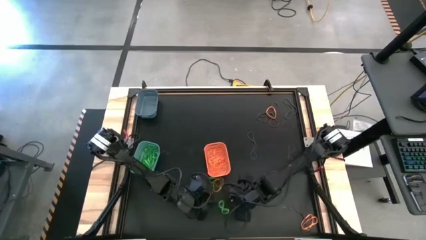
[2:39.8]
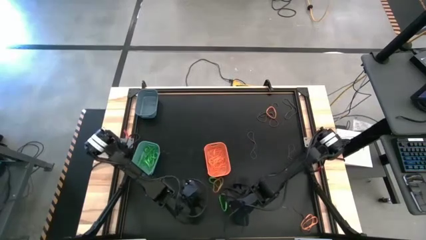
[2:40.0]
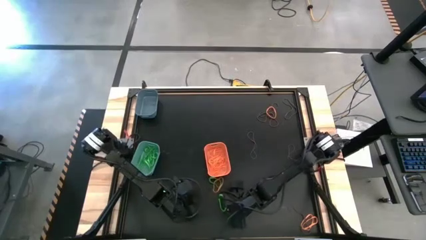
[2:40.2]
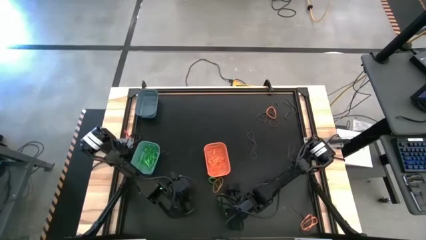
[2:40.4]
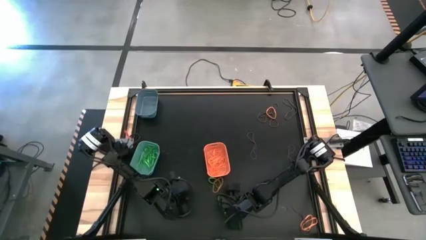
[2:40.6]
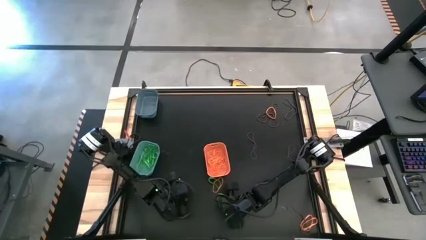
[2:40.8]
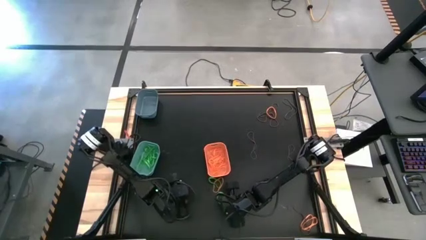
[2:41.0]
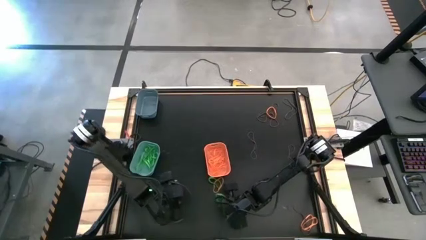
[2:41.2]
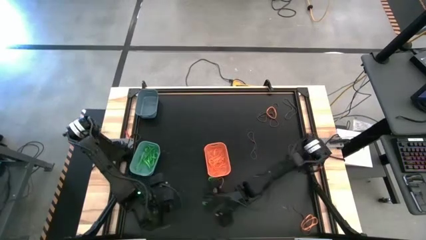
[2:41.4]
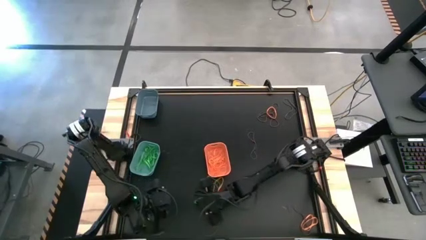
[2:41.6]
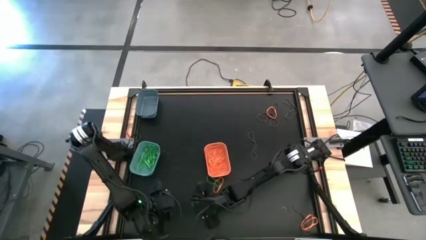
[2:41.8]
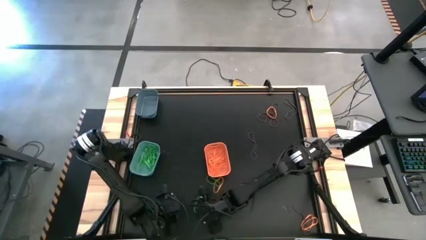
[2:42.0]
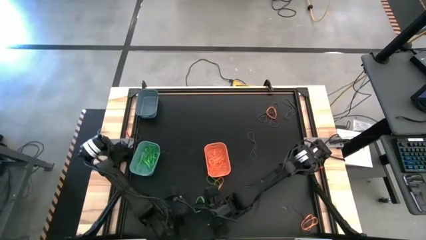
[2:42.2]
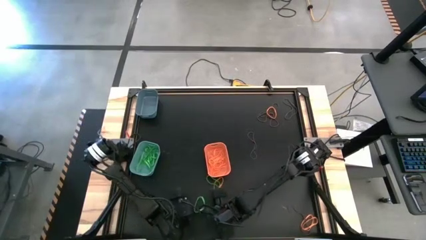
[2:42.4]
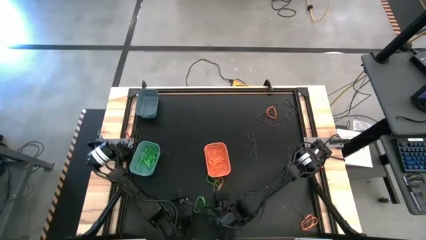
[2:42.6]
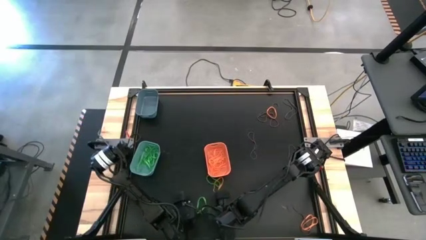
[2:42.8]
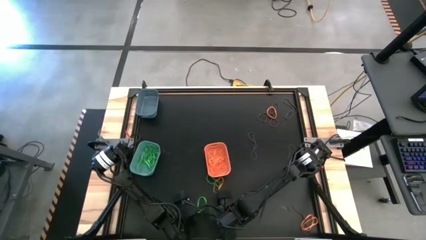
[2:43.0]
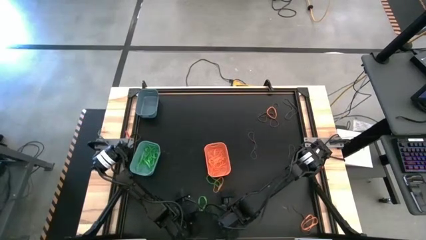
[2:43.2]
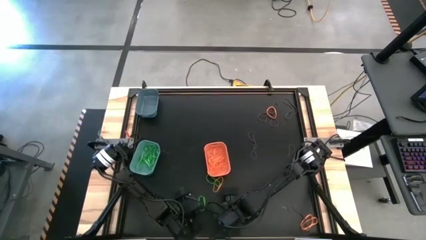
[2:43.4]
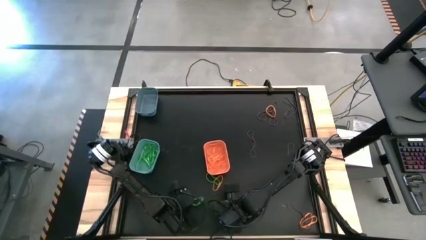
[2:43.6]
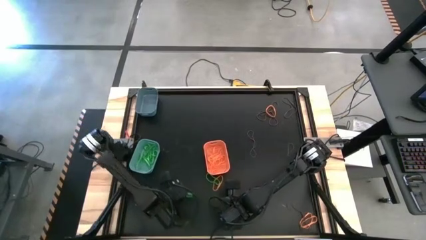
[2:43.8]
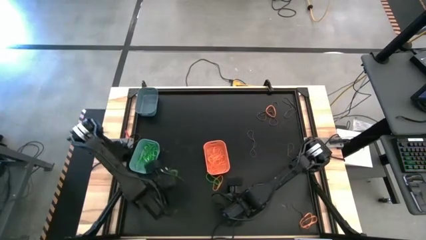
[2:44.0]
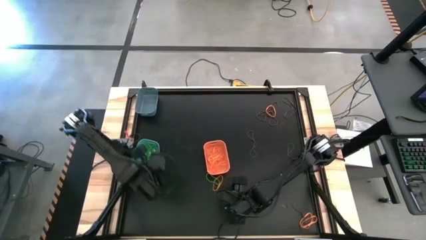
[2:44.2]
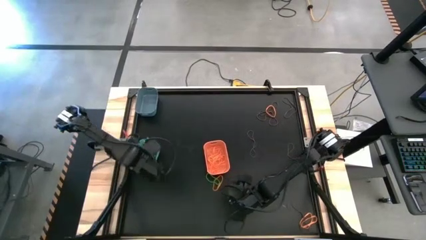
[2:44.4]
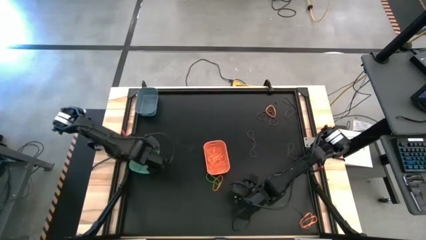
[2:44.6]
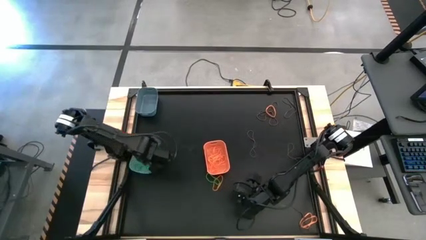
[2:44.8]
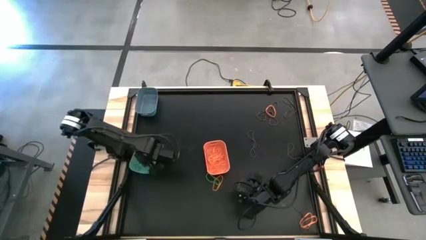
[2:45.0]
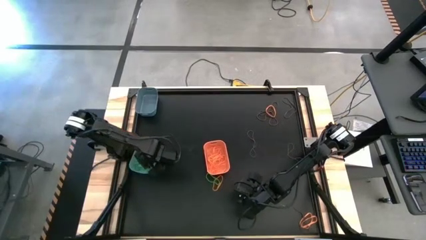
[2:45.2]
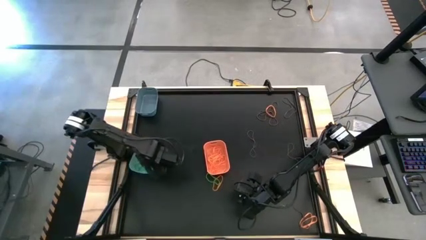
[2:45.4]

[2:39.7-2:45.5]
Task: Sort rubber bands into baskets
Put the green rubber band into the light sea green bin

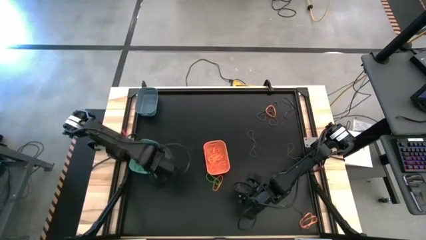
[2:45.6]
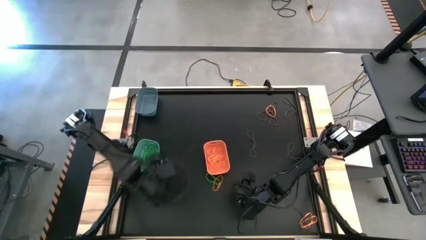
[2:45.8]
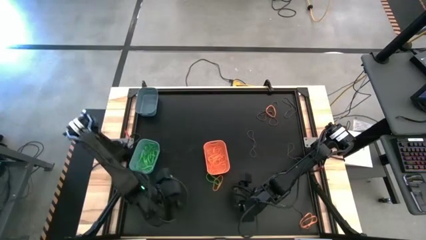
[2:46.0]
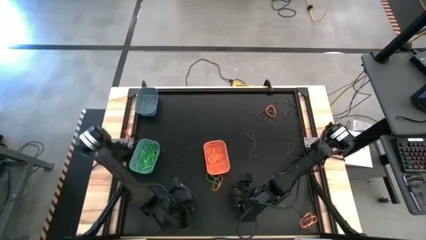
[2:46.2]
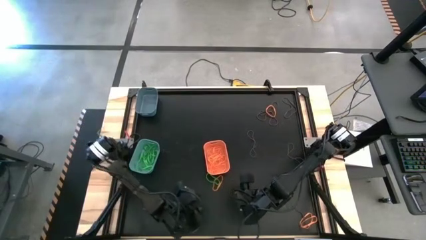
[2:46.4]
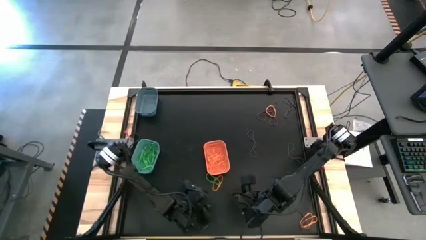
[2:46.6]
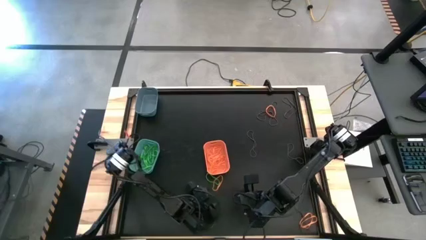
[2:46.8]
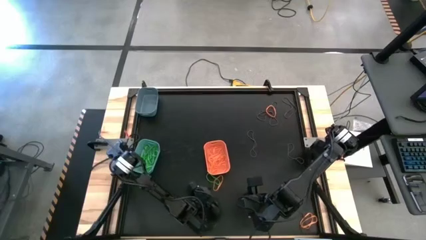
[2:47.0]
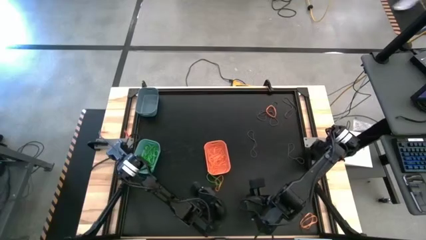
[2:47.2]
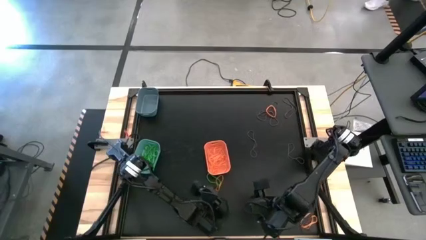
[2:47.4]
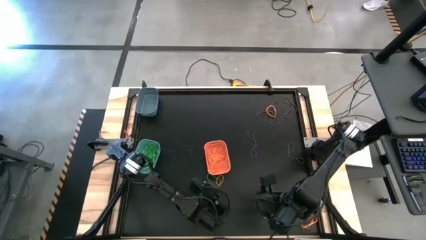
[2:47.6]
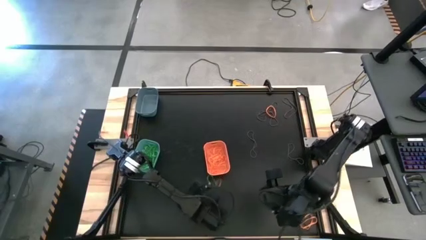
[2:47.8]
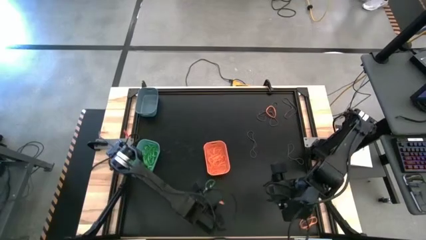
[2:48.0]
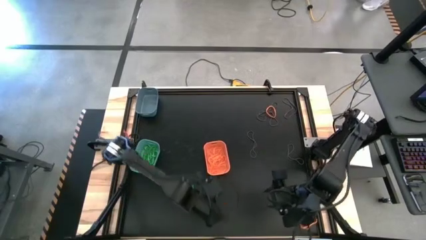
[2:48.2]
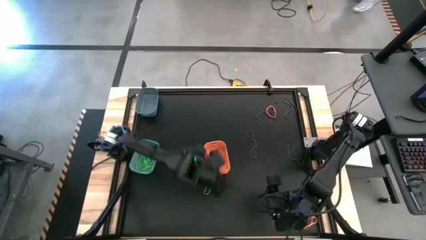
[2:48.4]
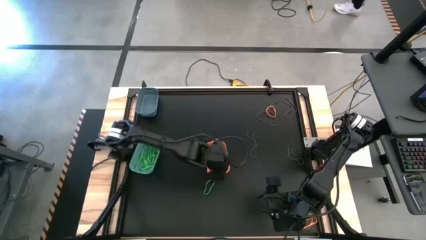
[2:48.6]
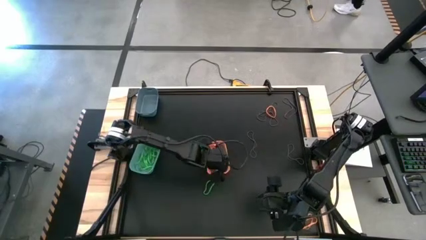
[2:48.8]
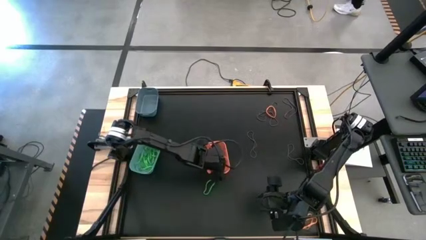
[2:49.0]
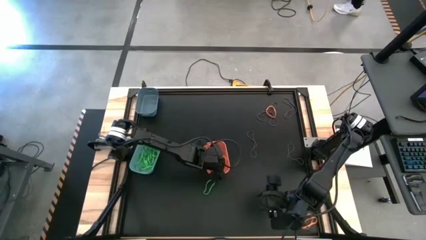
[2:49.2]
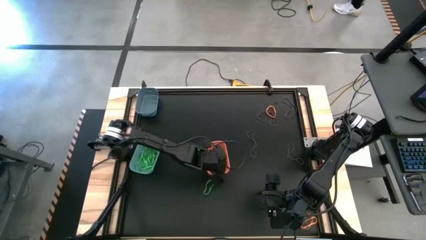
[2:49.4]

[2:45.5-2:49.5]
Put the orange rubber band into the orange bin

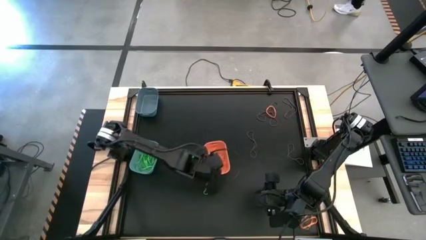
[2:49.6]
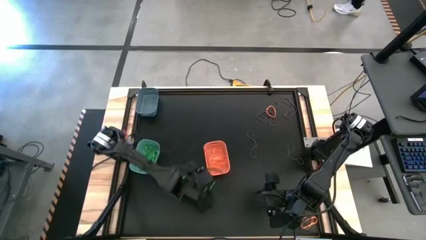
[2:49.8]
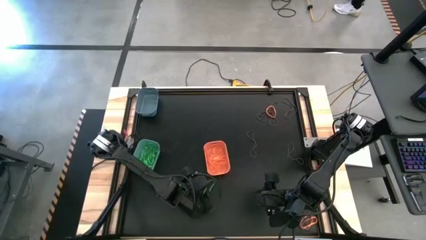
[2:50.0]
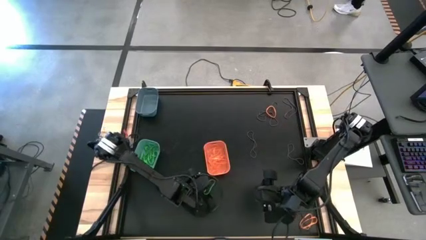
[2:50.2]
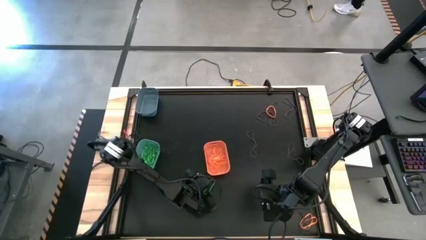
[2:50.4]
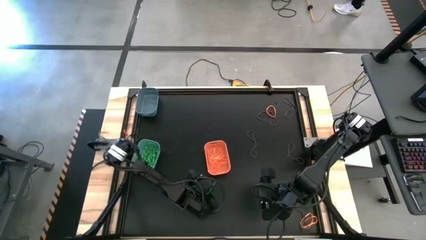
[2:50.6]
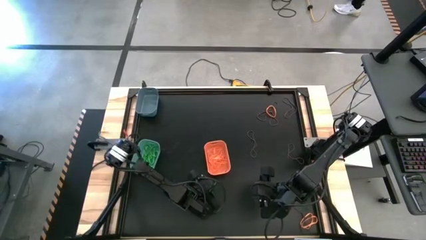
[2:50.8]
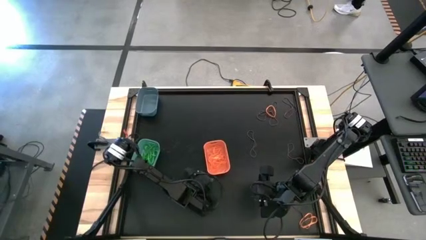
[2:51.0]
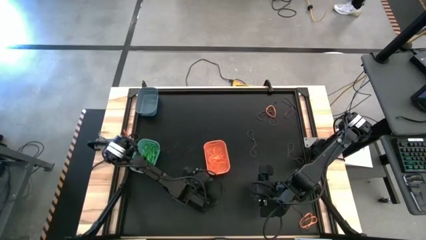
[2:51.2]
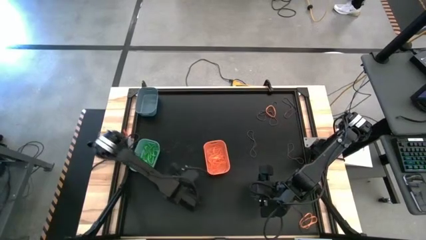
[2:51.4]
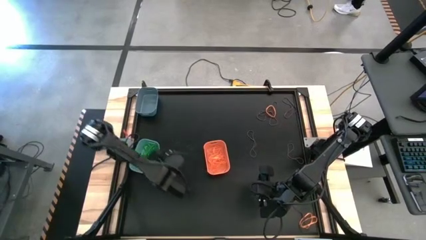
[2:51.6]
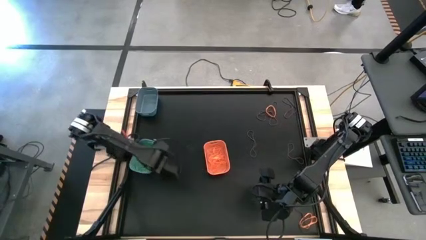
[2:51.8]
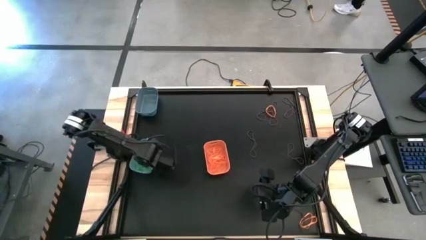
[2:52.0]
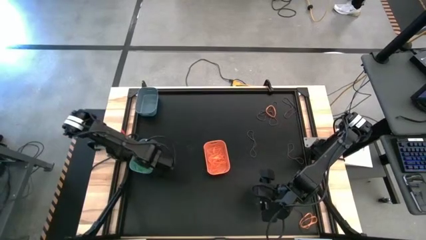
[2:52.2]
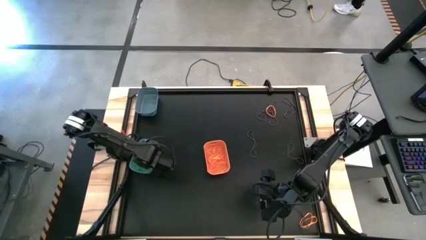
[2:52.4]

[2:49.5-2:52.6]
Put the green rubber band into the light sea green bin
